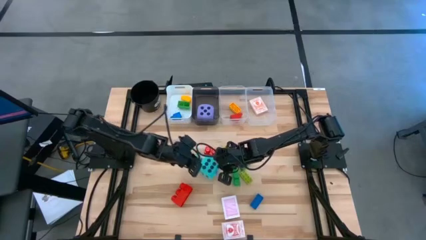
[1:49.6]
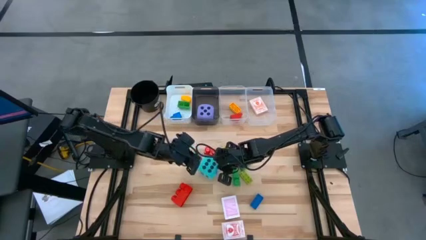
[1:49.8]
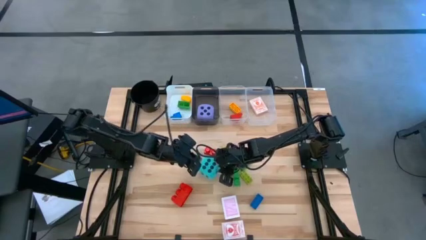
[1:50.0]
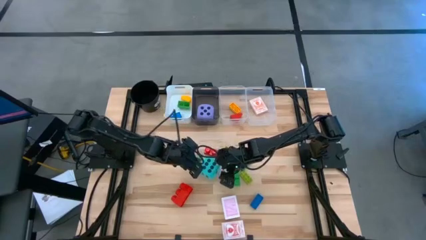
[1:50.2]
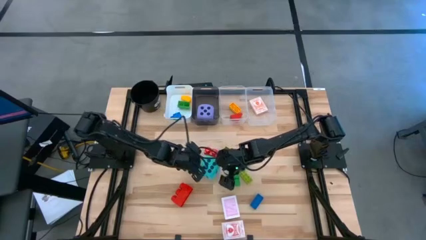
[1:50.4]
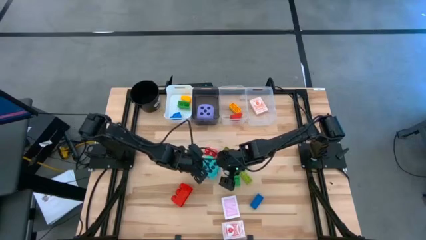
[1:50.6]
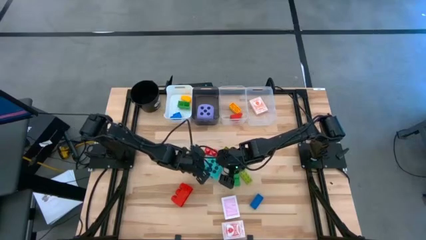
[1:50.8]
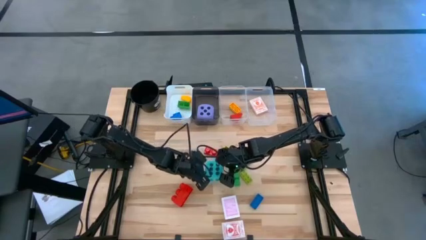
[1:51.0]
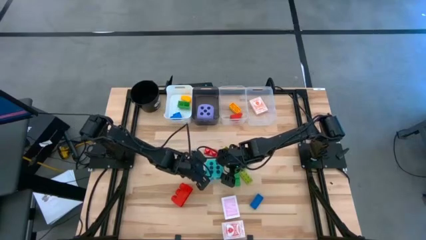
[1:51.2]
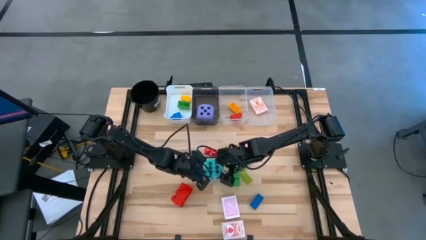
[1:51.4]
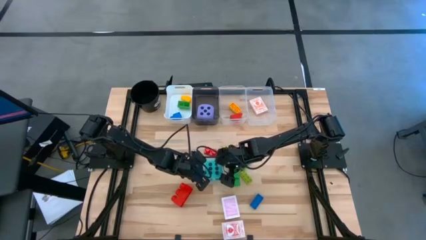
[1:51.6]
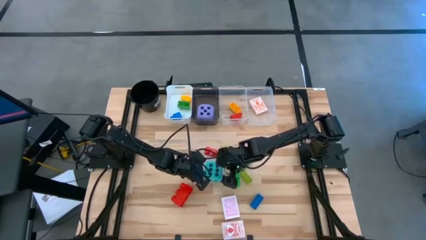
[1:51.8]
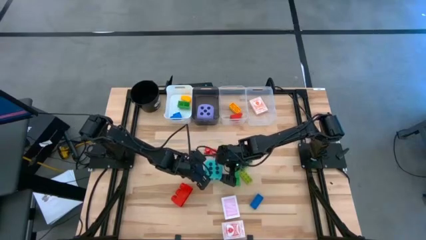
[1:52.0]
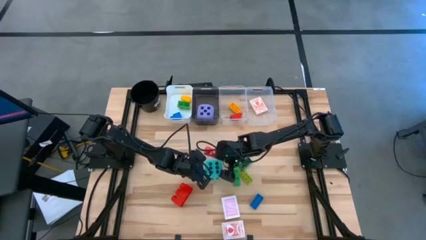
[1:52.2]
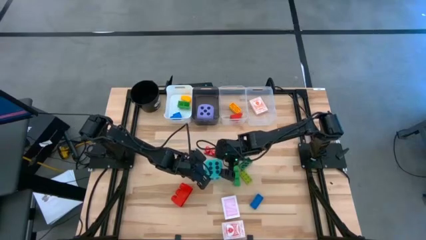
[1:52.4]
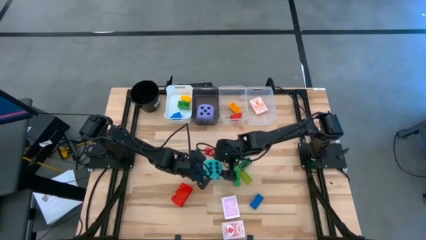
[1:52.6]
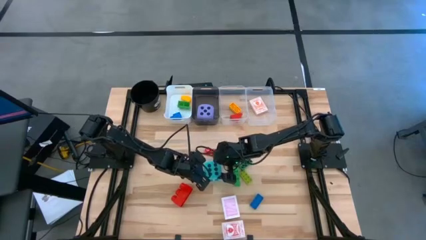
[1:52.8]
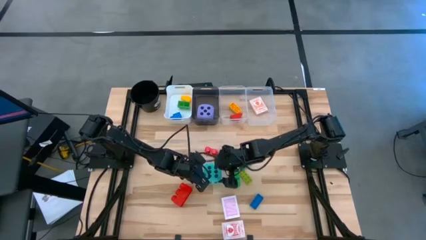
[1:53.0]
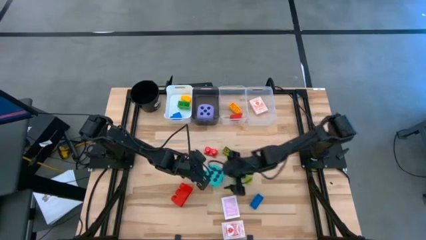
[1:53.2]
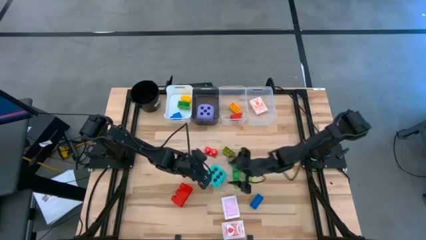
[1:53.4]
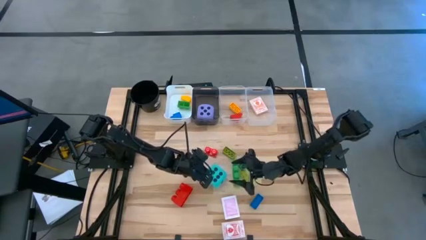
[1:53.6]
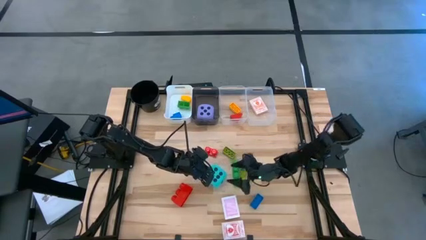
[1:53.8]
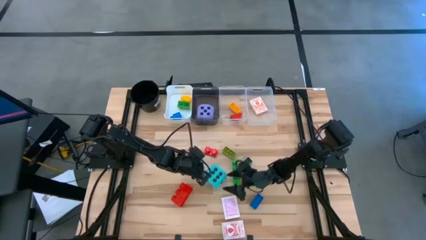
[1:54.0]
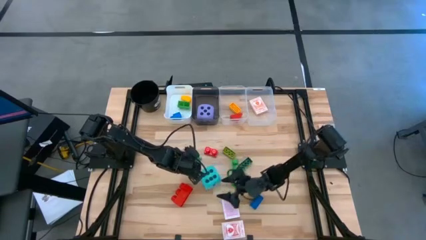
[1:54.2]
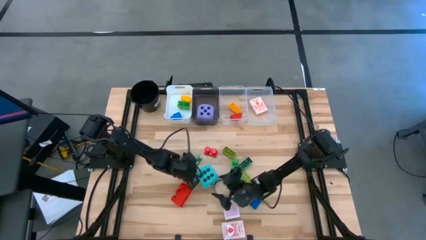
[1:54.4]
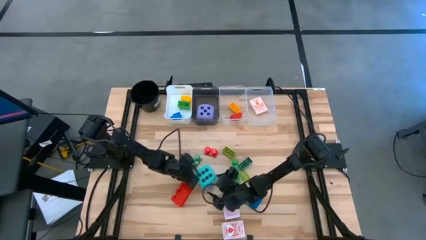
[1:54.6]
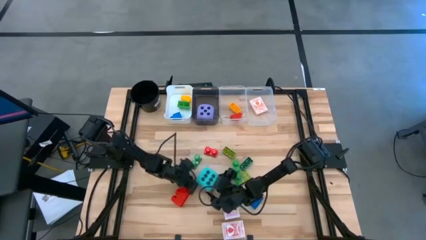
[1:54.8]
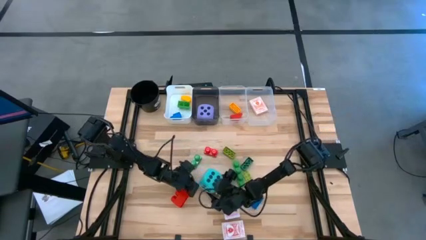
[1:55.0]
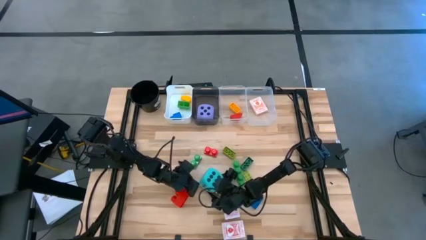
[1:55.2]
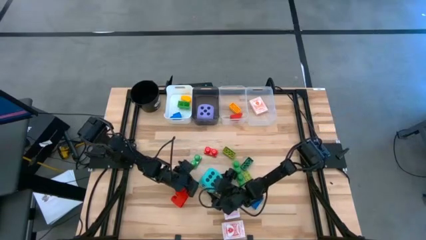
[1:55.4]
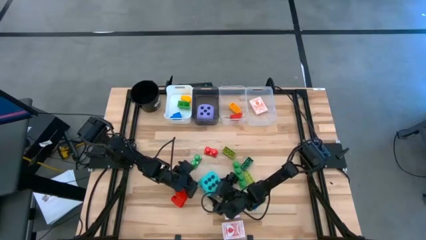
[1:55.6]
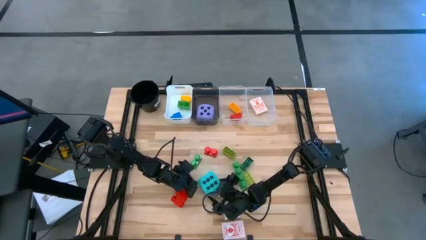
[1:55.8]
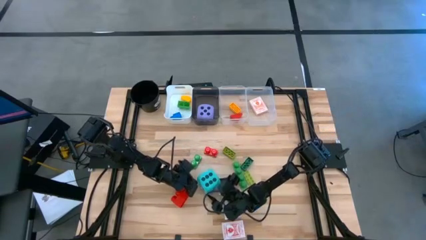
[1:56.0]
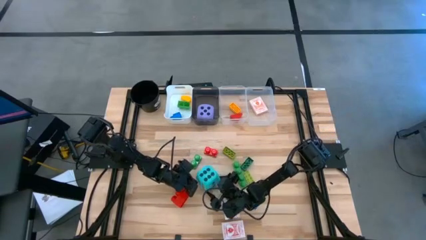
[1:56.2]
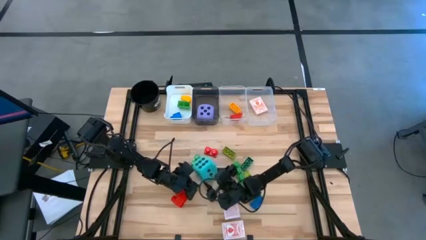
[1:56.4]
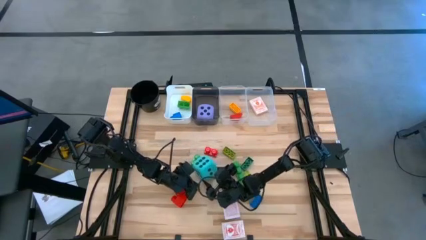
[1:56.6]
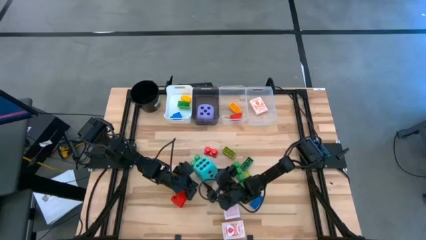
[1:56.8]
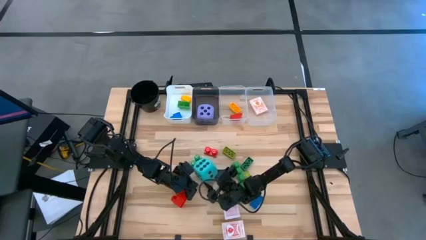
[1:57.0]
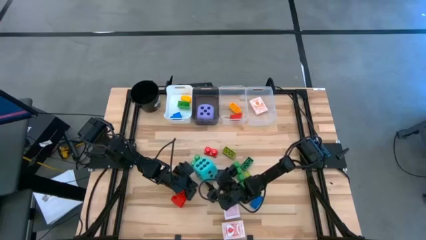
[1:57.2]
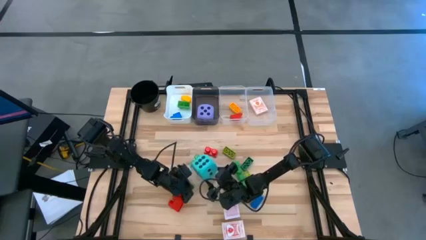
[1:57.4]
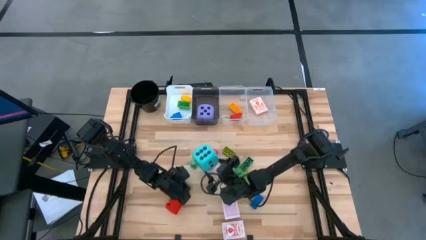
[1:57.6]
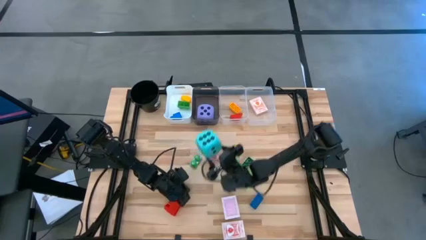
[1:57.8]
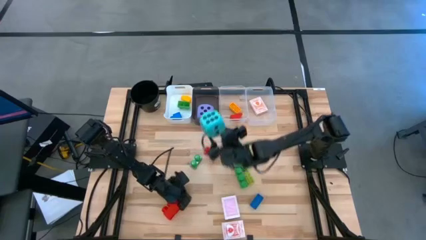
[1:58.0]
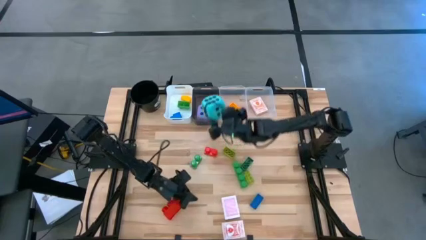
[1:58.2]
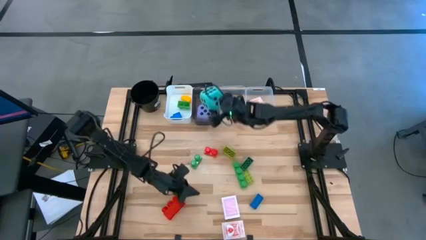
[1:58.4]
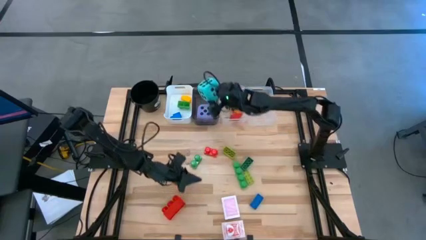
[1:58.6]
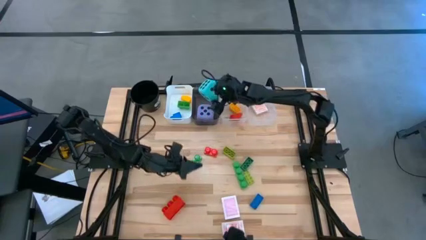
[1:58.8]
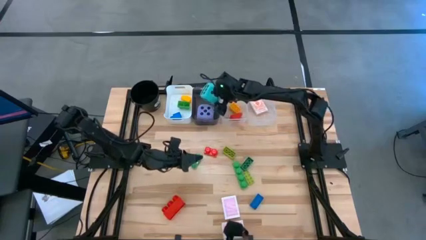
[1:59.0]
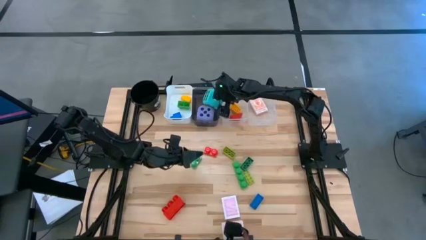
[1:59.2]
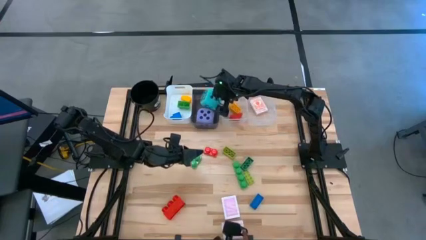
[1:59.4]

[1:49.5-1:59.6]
Task: Pick & Place Toys
Put the blue dice into the black transparent bin

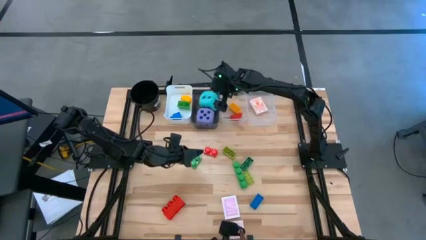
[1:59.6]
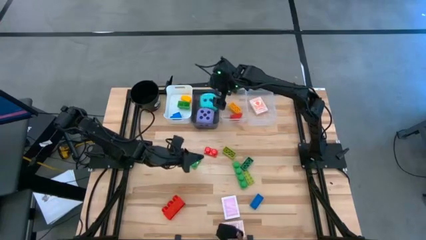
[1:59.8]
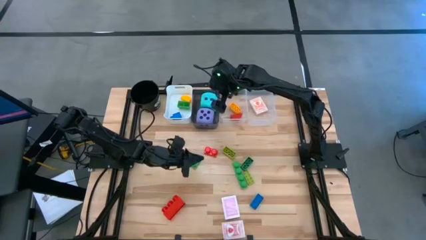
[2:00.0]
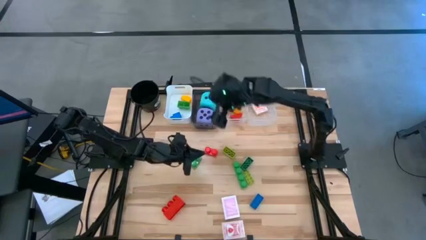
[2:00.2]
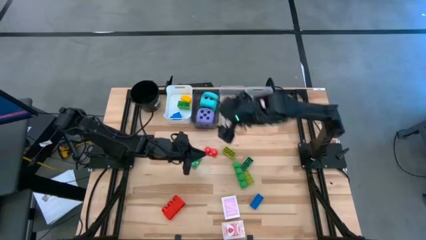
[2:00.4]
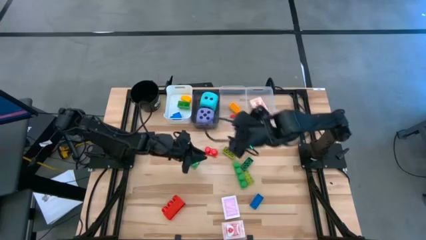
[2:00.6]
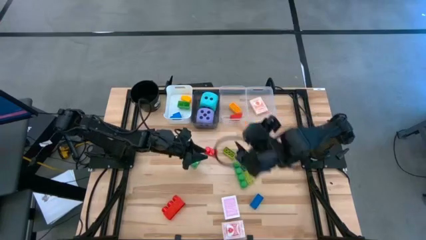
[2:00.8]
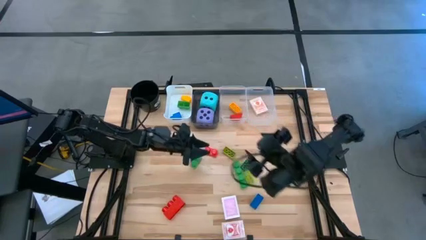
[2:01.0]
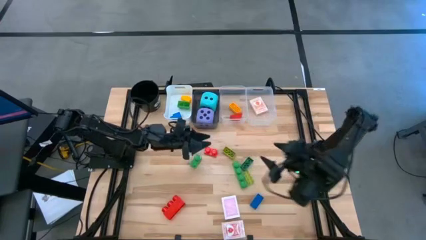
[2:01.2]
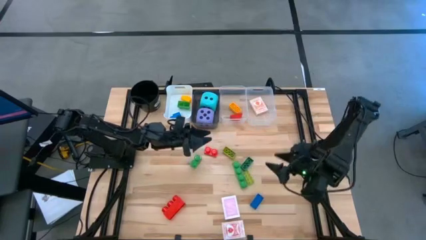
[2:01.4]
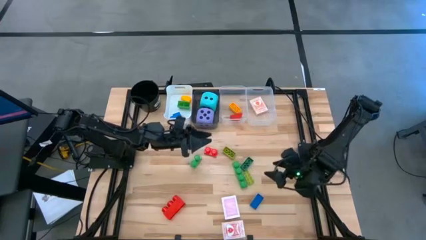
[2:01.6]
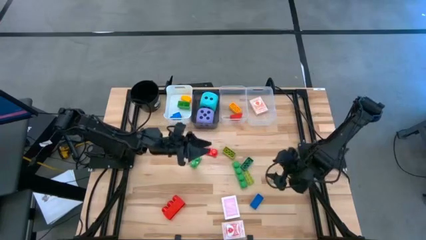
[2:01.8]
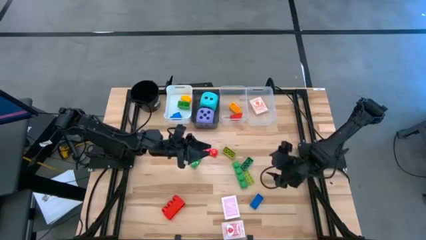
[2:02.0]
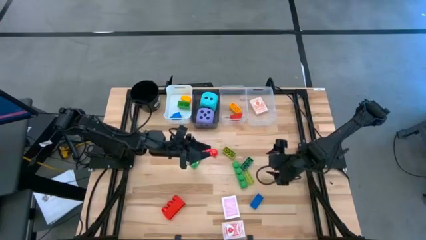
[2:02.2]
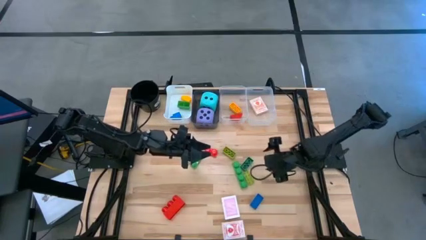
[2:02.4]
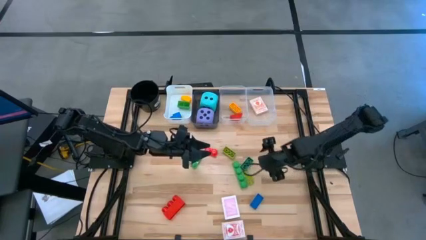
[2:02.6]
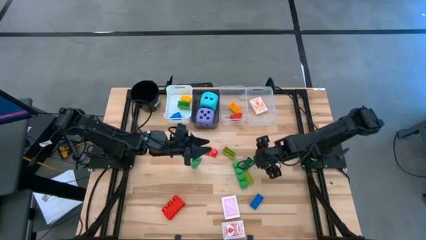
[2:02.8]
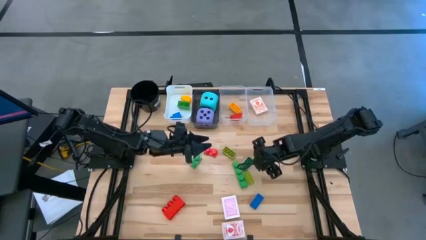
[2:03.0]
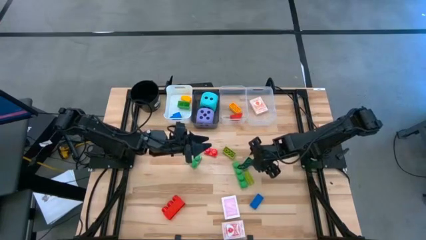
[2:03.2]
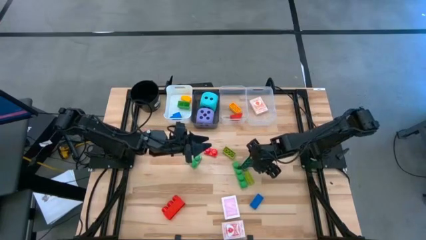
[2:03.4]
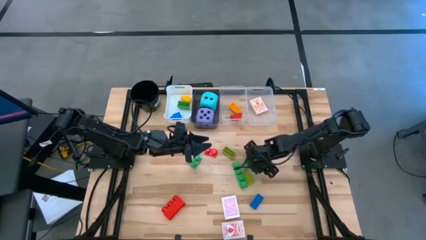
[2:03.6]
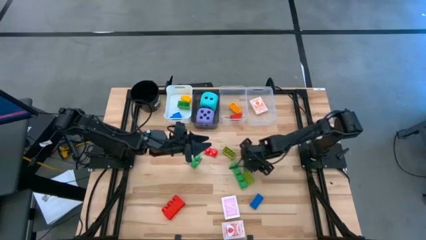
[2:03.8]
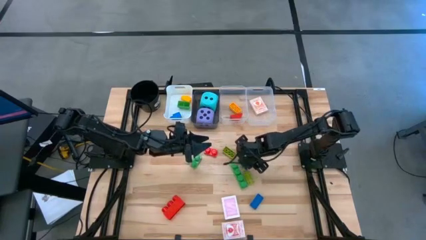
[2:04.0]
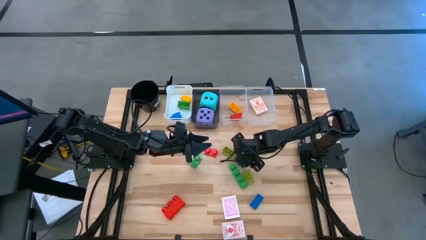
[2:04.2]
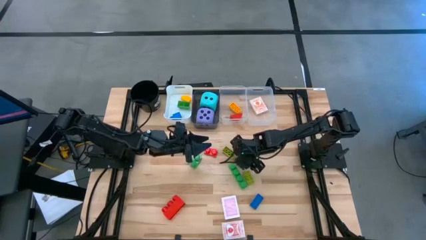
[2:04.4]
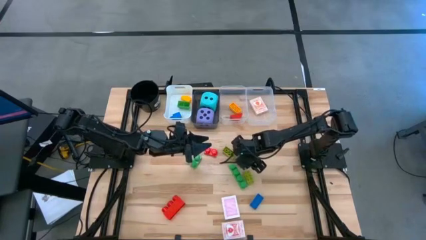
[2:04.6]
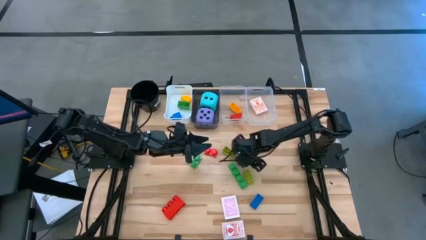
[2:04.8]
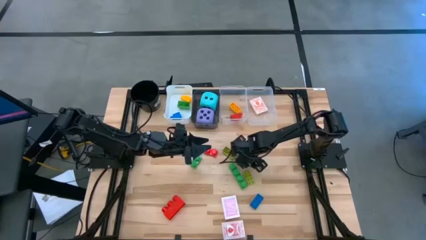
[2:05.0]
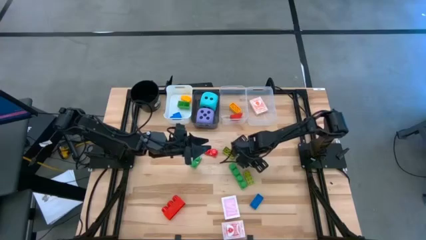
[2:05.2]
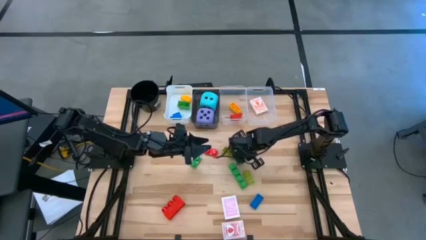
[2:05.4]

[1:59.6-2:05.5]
Put the small dark green 8-stud game piece into the left transparent bin
